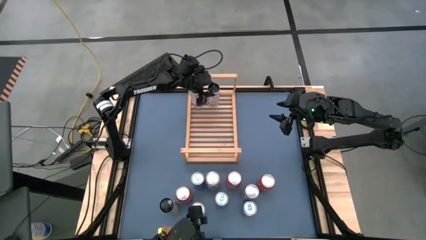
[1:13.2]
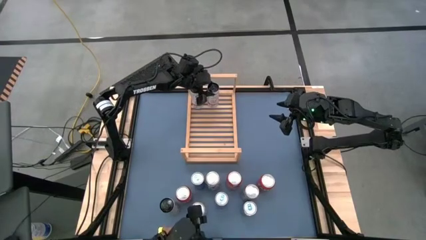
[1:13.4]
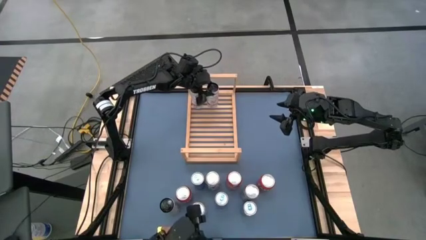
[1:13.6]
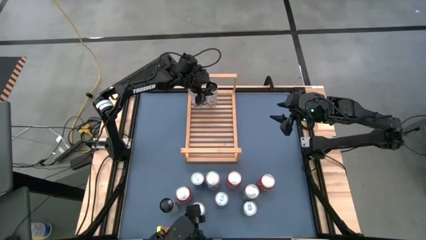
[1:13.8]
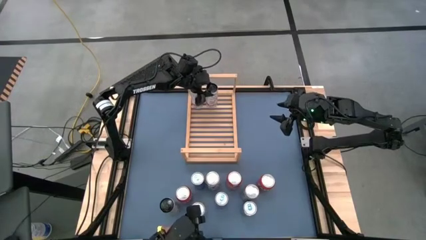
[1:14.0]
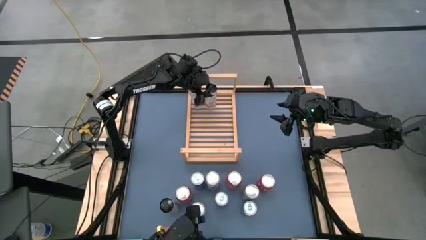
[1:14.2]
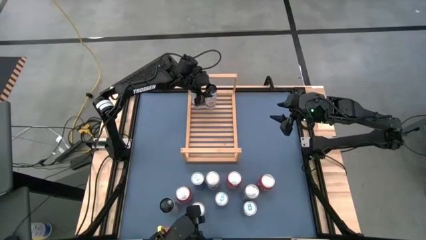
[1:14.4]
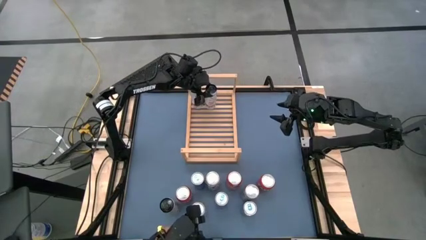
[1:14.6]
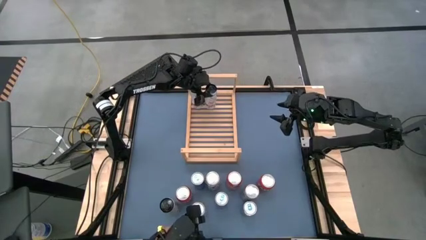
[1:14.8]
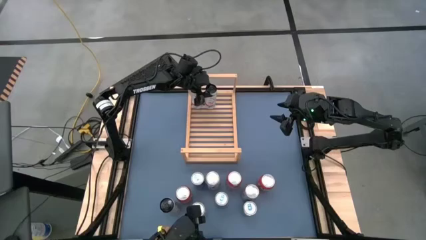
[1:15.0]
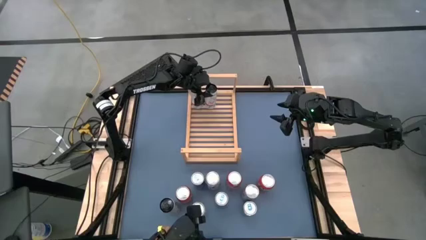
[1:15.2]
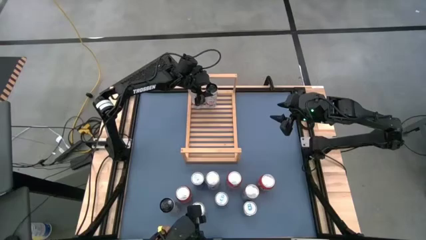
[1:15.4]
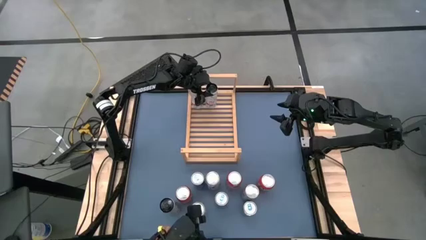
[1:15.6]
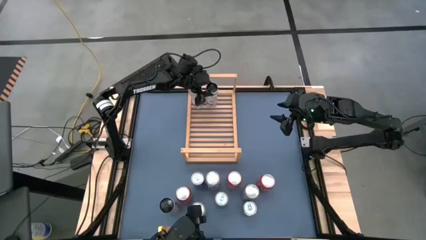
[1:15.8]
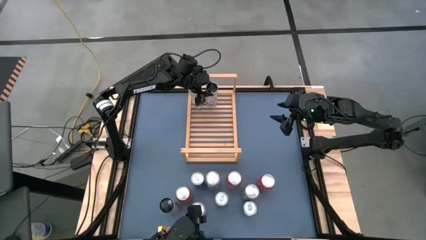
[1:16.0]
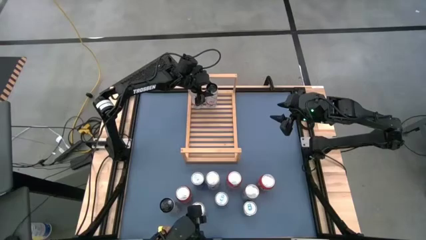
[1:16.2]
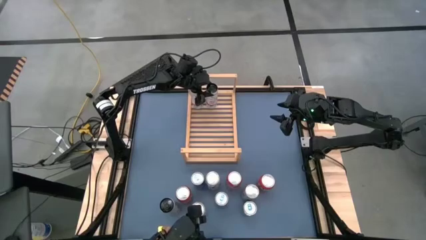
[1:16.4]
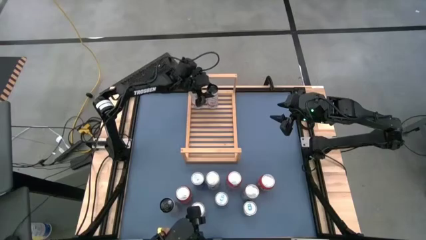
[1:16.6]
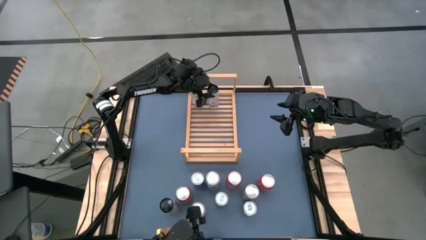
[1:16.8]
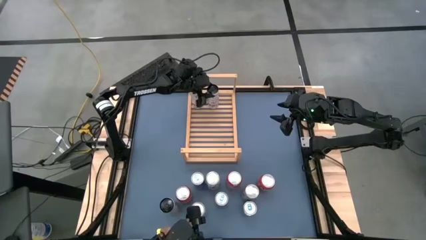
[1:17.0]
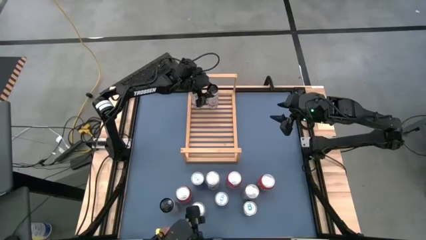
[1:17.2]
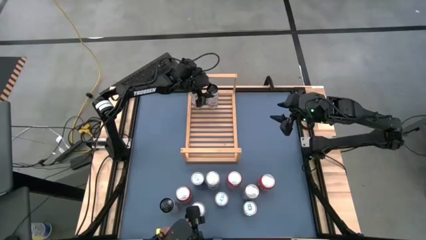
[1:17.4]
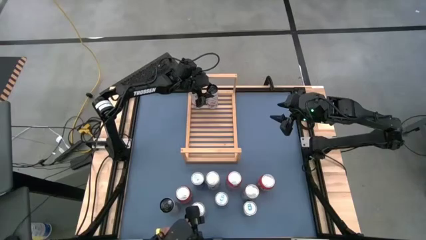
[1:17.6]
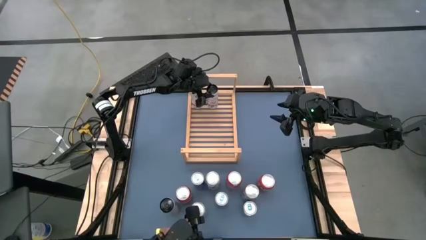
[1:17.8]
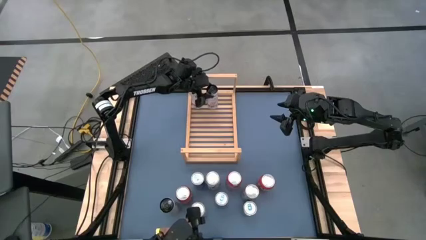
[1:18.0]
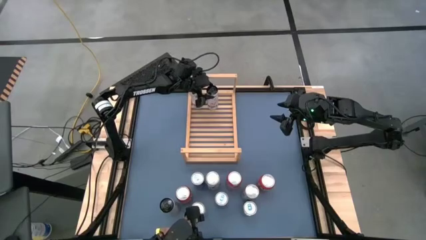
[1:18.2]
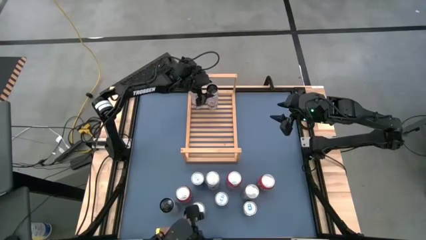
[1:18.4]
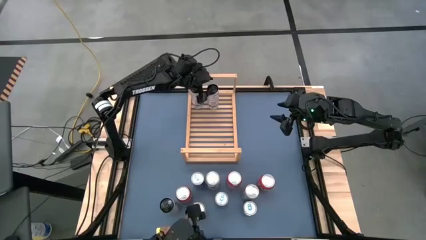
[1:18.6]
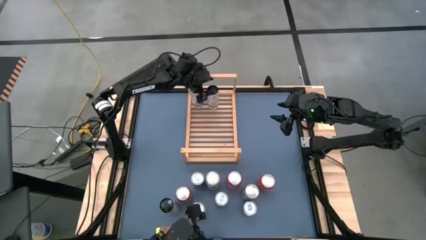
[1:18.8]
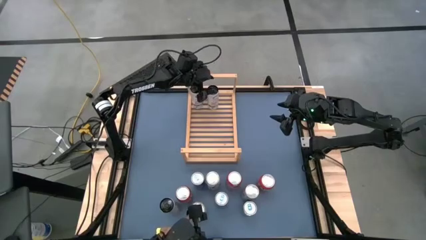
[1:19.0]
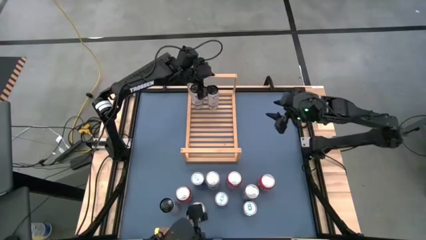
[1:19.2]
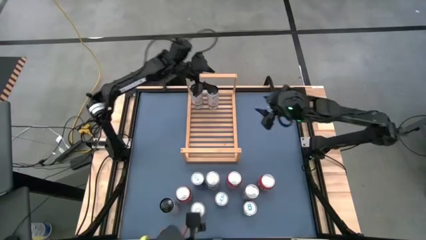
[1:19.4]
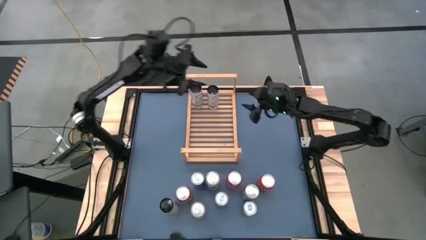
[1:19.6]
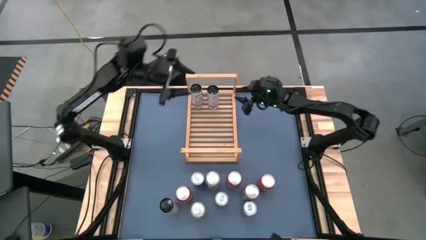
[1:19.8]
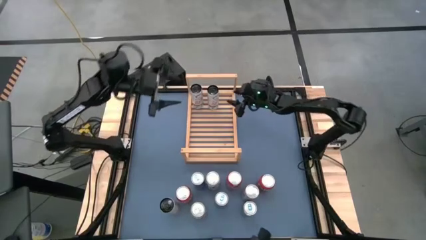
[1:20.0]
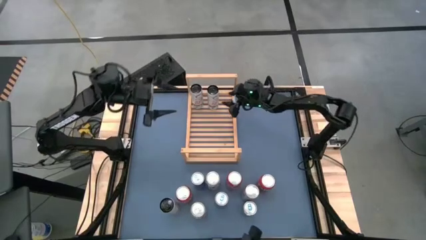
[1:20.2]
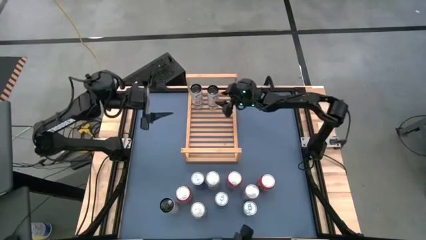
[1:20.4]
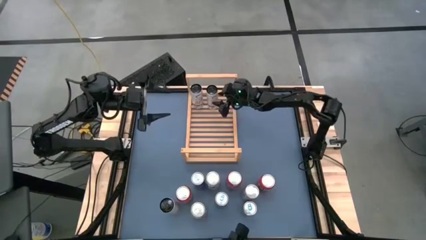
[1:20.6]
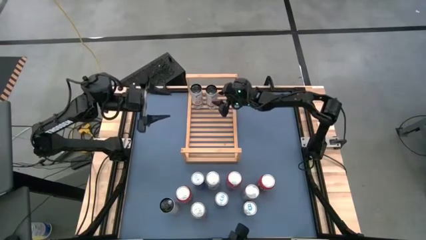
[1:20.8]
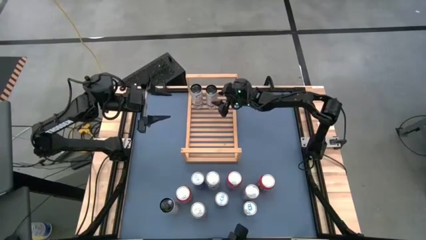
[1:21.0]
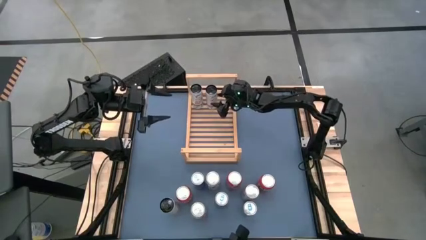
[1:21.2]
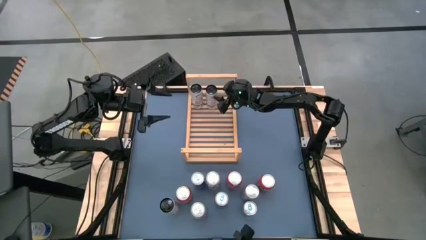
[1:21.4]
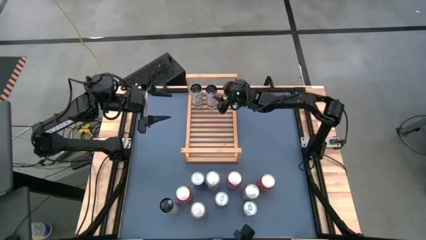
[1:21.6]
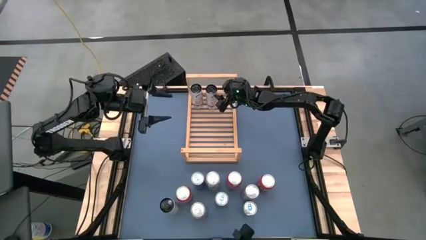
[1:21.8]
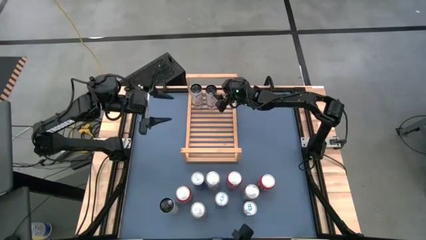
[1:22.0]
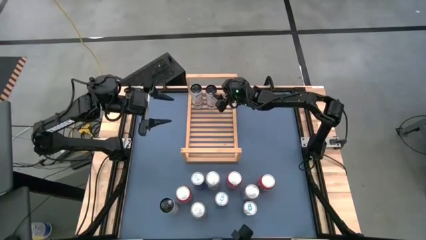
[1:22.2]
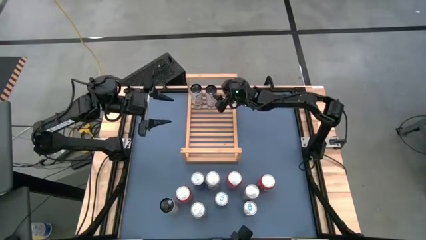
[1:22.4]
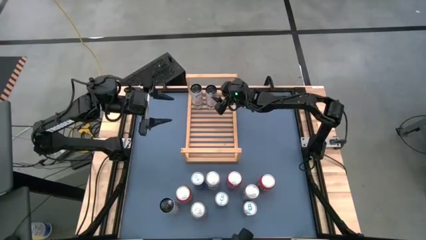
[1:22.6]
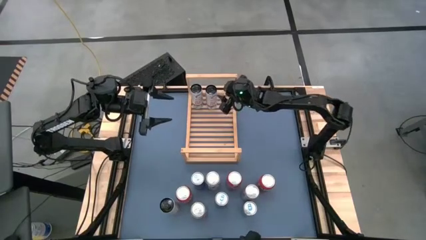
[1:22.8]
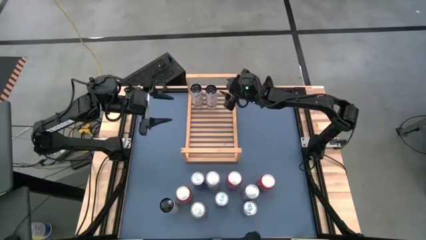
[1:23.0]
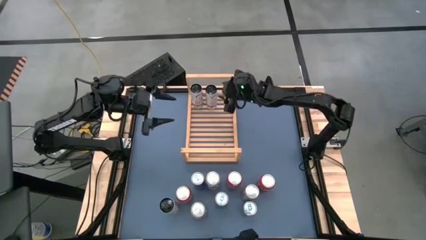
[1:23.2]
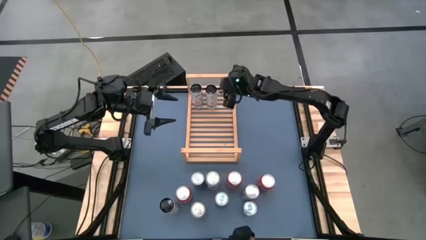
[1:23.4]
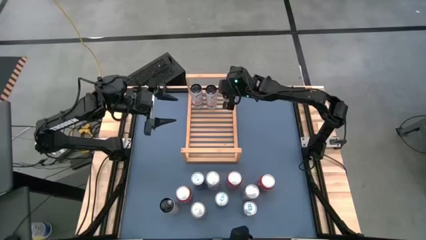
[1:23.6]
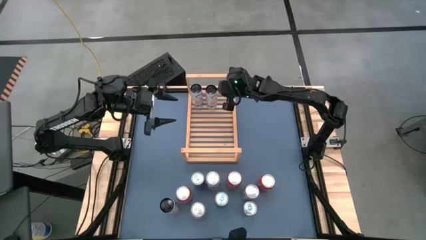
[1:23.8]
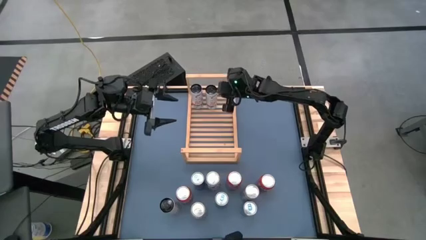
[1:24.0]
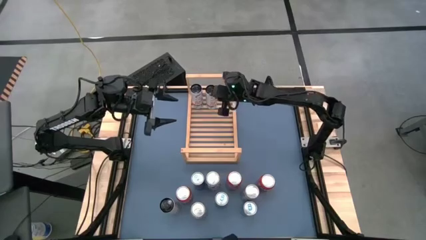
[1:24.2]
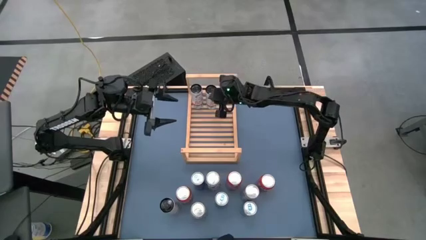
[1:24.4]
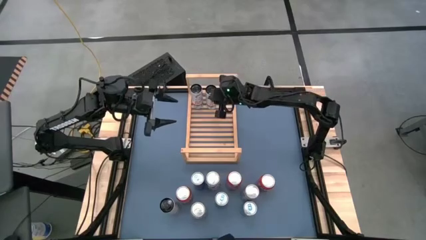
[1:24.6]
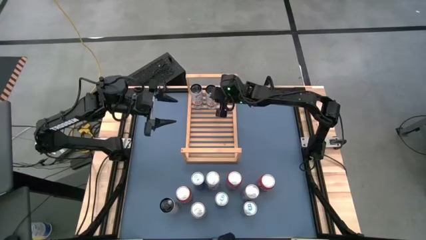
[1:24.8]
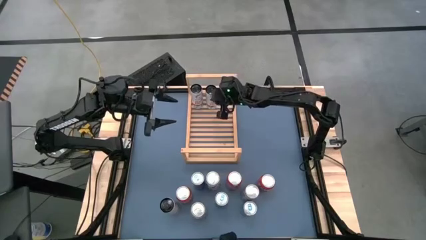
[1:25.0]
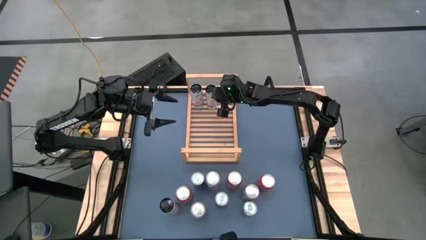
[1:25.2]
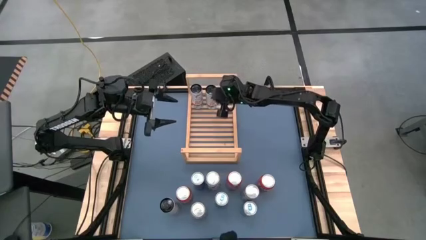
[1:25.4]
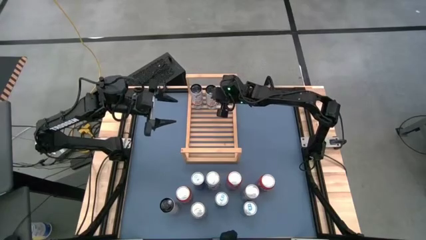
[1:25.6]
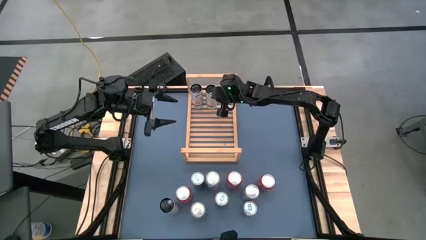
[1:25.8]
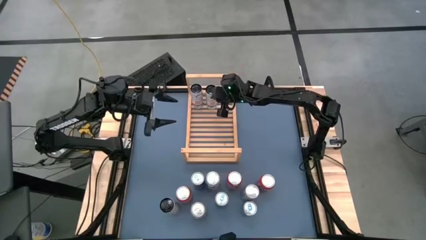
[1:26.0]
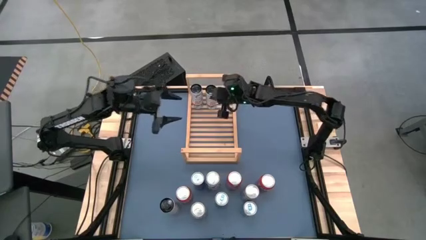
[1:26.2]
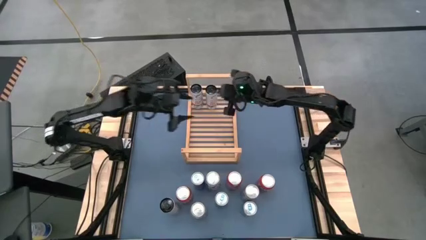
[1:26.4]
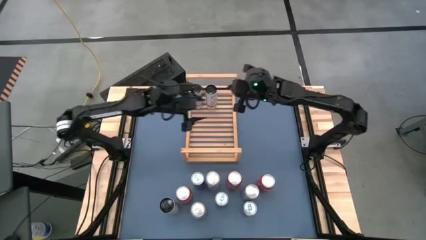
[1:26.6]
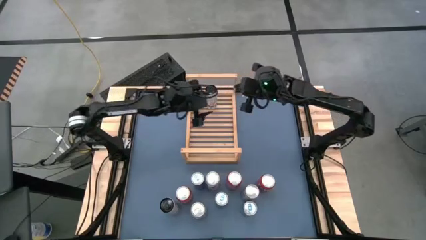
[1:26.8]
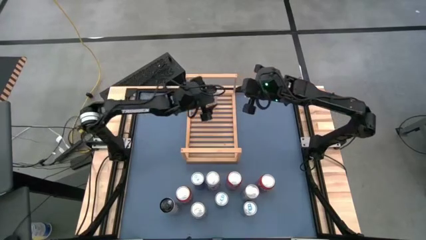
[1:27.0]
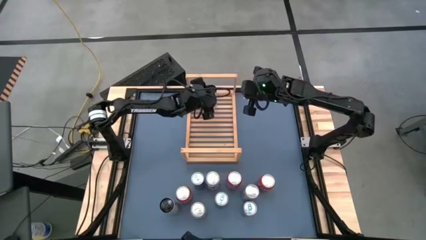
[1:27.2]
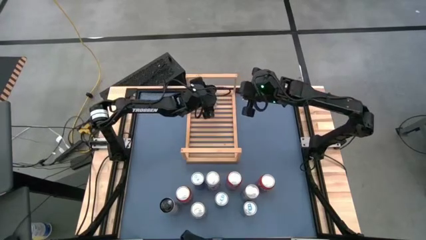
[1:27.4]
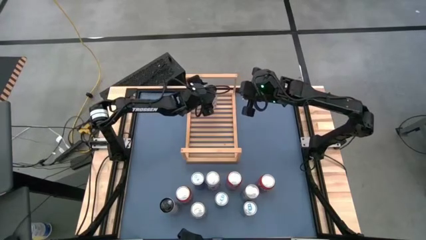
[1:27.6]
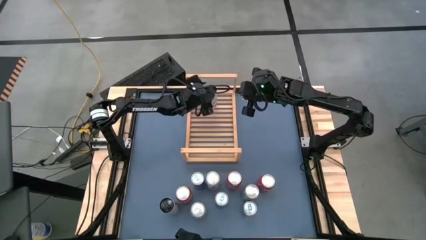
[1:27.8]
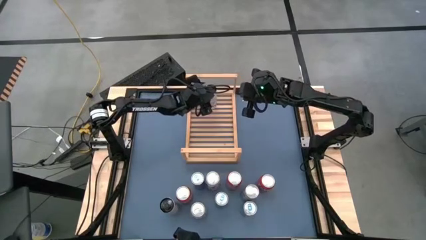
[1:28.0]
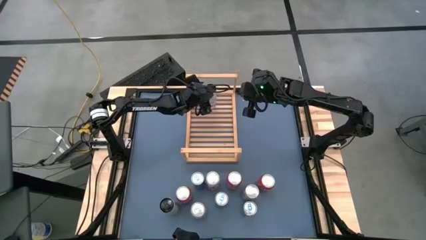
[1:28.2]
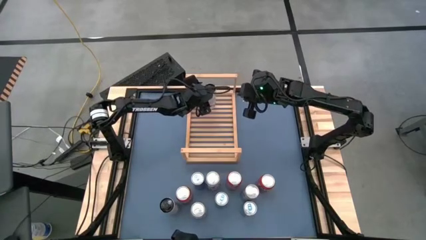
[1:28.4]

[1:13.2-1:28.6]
Task: Place canned beverage on shelf
Put the right white soda can on the shelf aligned with the other white soda can
